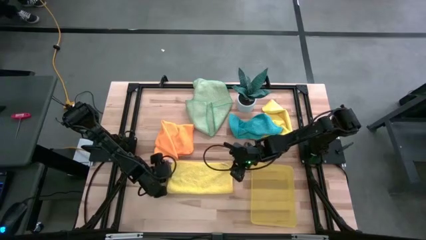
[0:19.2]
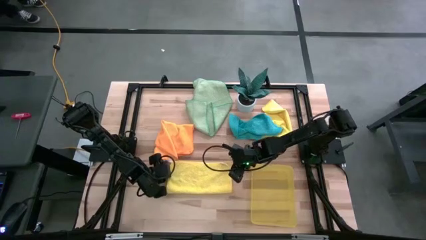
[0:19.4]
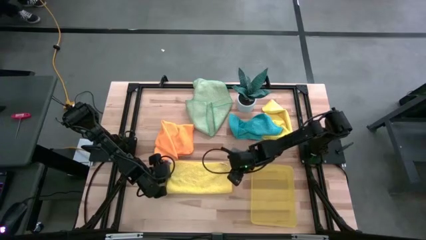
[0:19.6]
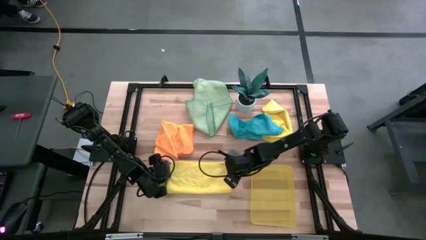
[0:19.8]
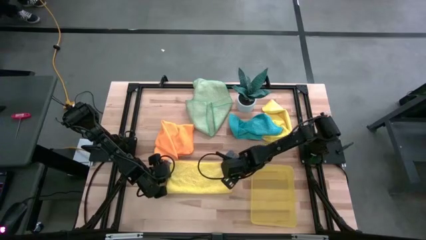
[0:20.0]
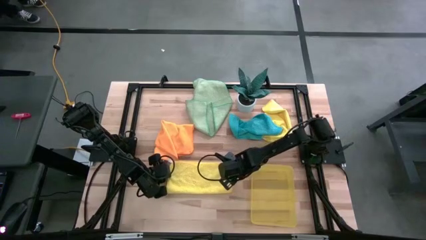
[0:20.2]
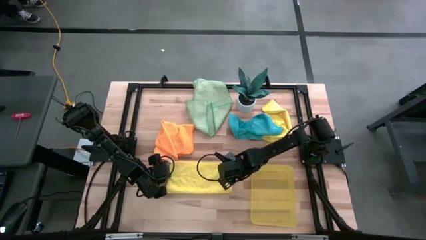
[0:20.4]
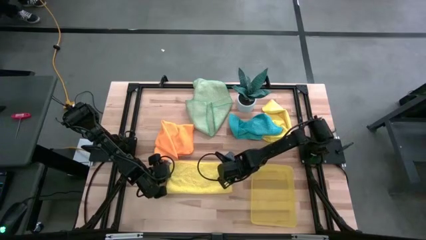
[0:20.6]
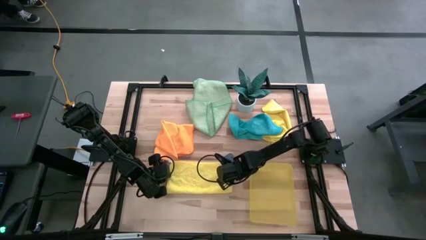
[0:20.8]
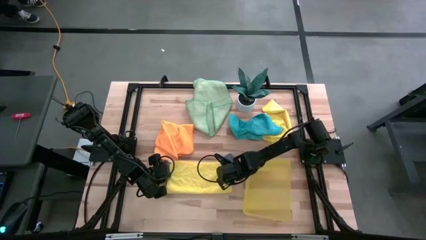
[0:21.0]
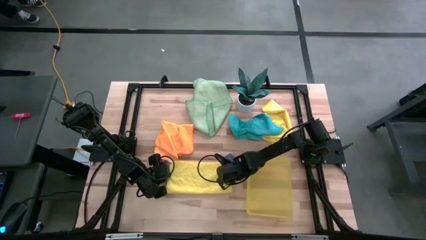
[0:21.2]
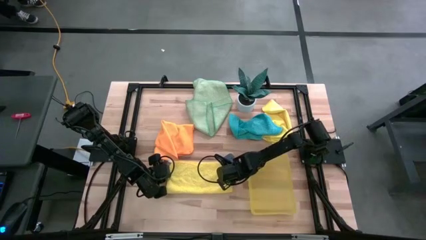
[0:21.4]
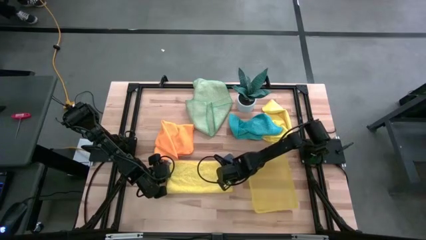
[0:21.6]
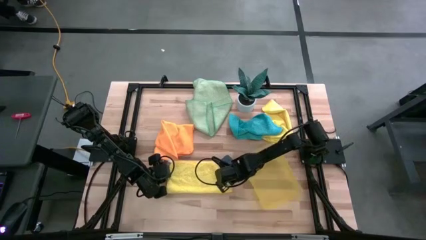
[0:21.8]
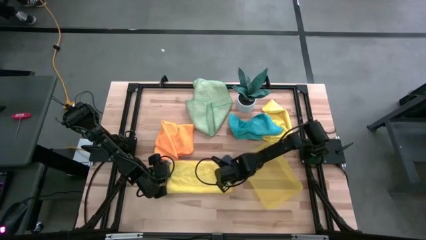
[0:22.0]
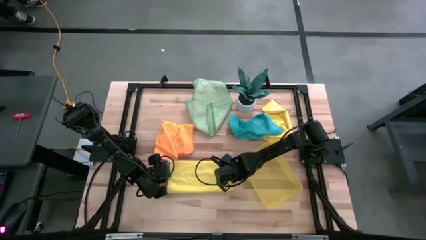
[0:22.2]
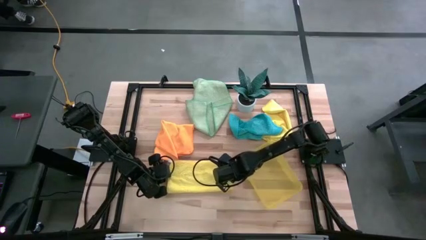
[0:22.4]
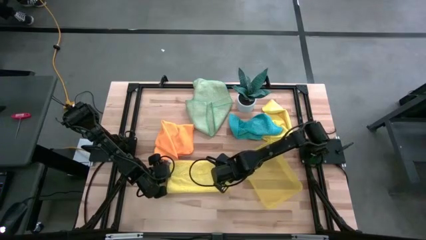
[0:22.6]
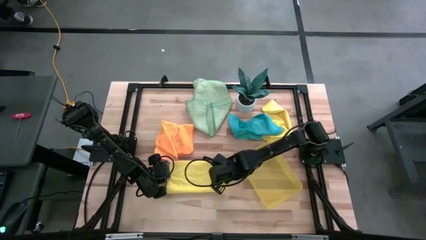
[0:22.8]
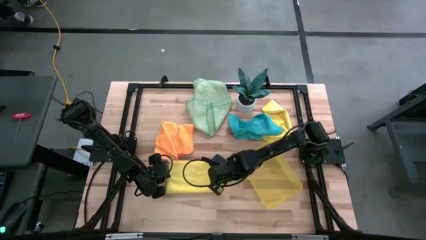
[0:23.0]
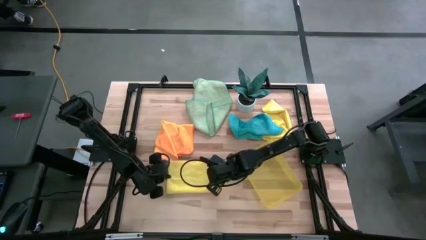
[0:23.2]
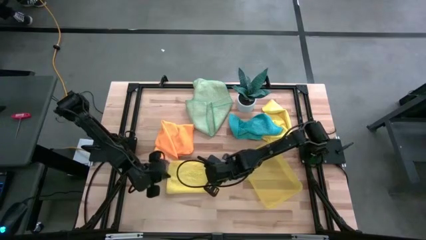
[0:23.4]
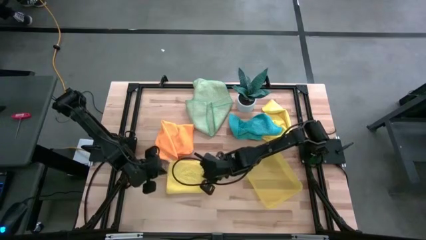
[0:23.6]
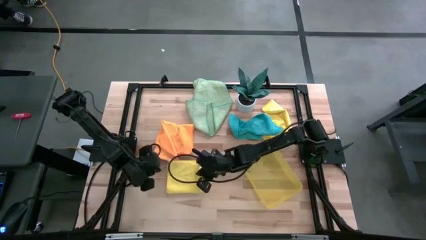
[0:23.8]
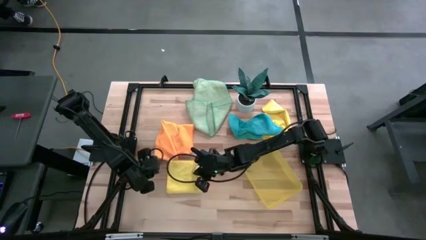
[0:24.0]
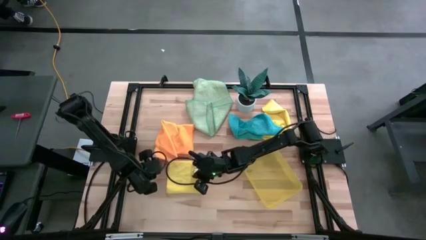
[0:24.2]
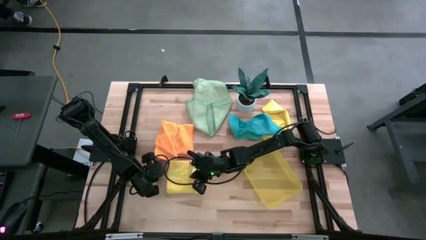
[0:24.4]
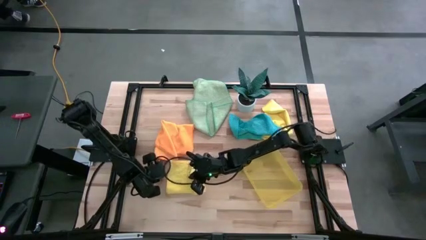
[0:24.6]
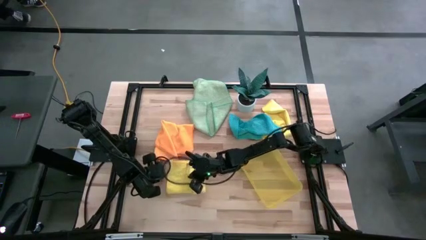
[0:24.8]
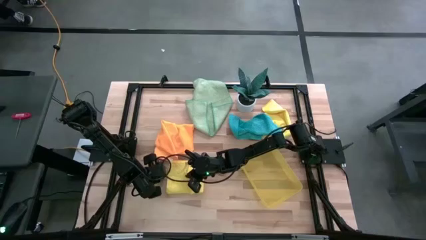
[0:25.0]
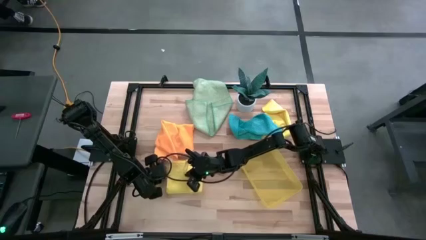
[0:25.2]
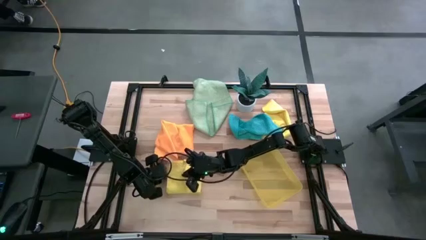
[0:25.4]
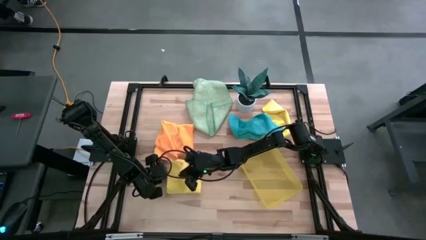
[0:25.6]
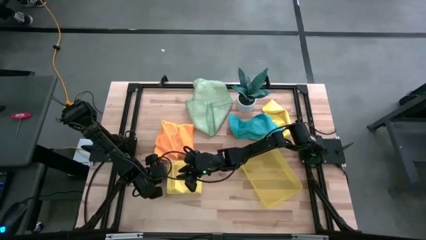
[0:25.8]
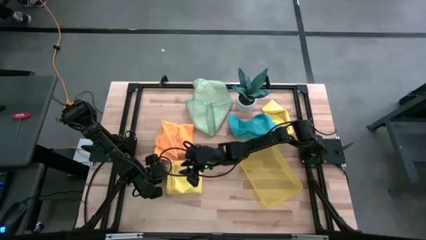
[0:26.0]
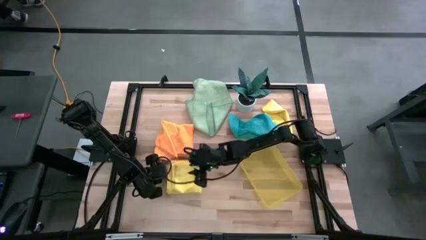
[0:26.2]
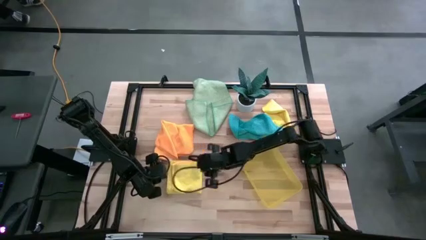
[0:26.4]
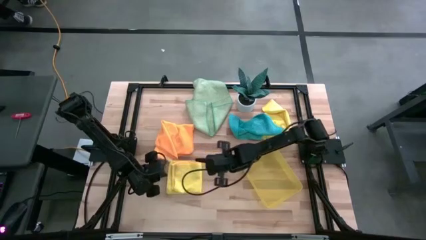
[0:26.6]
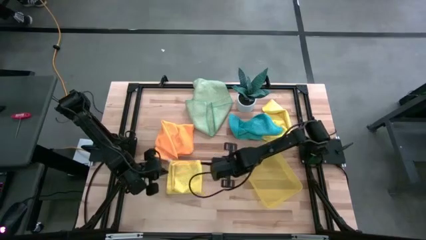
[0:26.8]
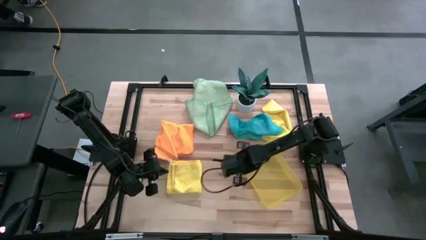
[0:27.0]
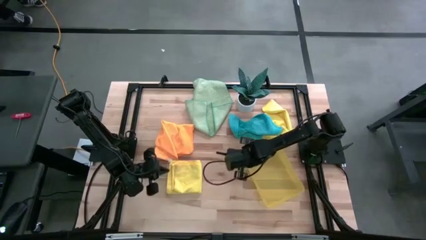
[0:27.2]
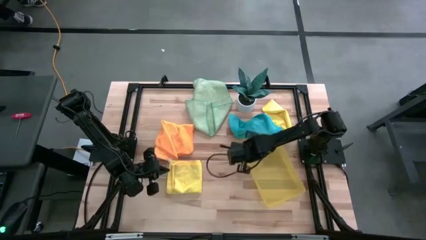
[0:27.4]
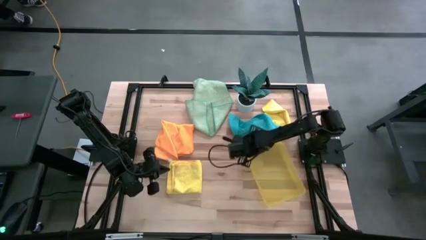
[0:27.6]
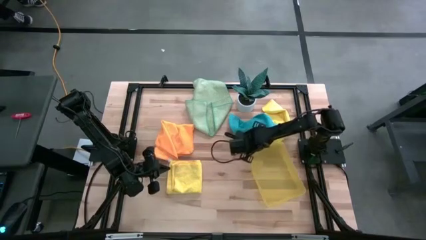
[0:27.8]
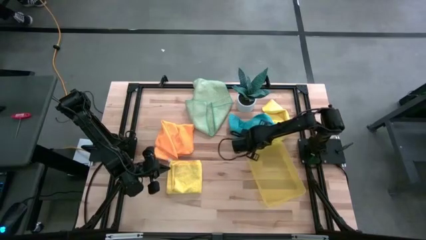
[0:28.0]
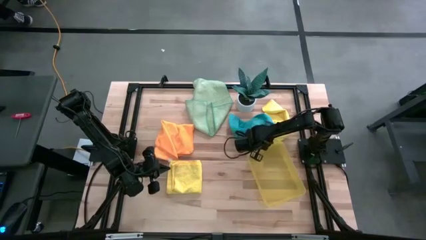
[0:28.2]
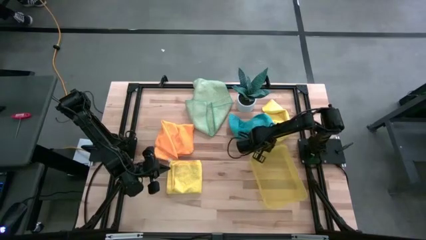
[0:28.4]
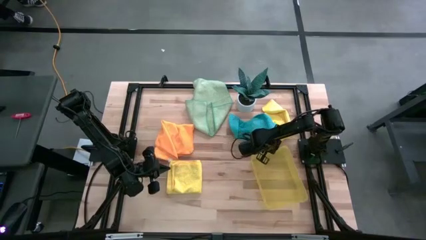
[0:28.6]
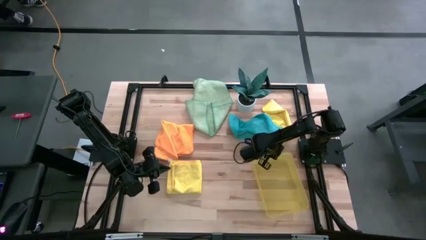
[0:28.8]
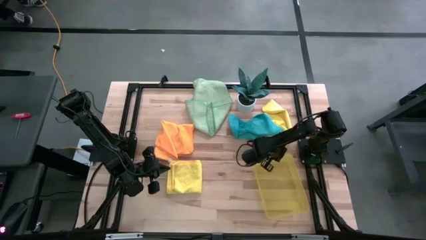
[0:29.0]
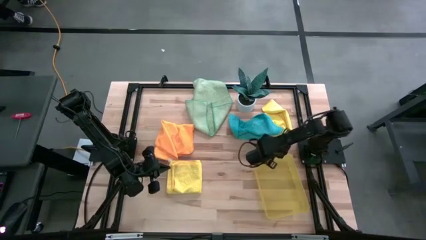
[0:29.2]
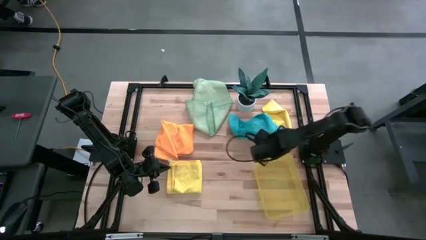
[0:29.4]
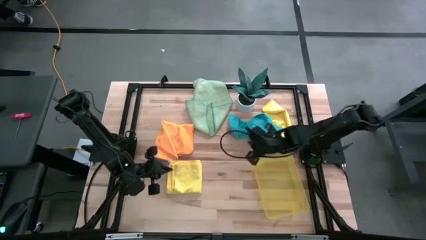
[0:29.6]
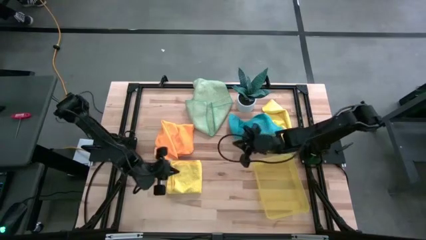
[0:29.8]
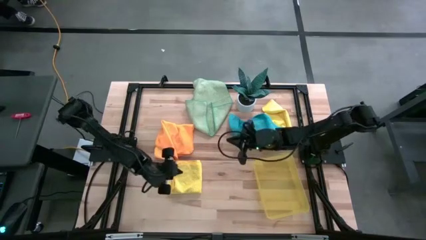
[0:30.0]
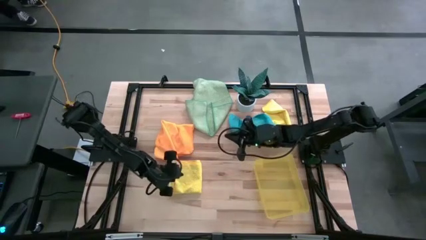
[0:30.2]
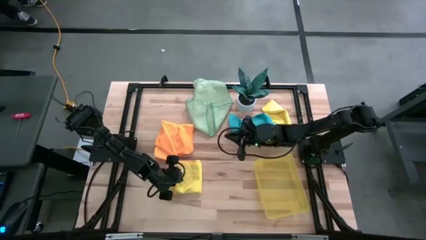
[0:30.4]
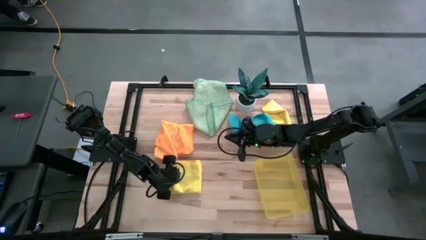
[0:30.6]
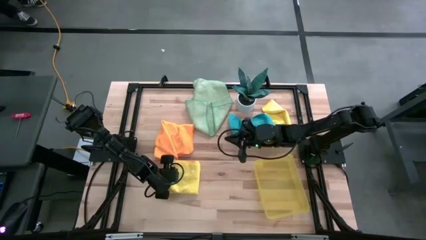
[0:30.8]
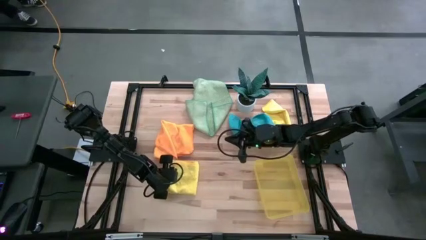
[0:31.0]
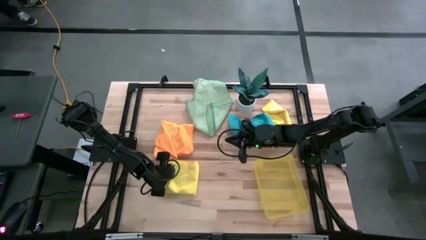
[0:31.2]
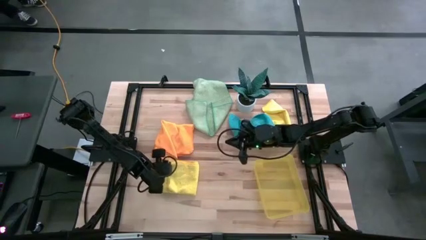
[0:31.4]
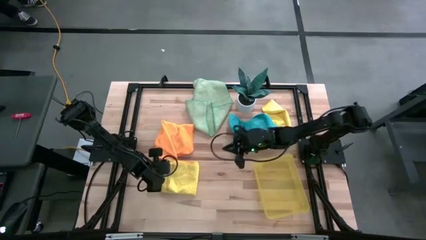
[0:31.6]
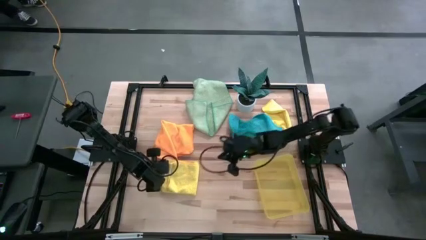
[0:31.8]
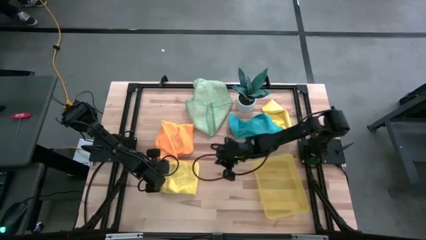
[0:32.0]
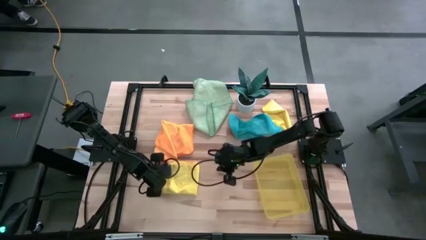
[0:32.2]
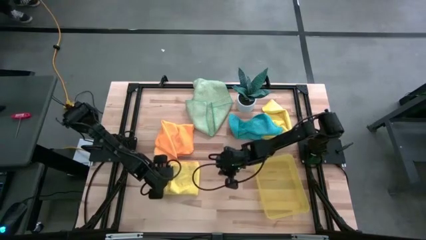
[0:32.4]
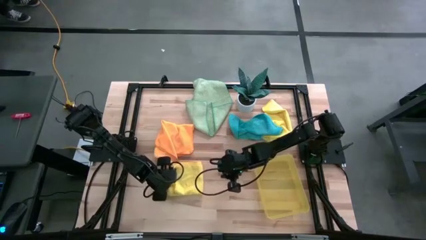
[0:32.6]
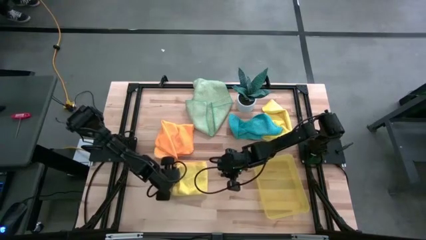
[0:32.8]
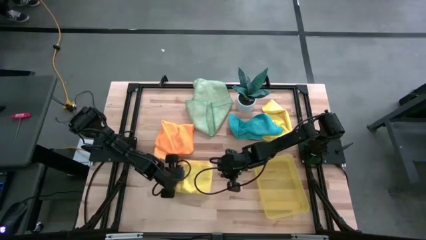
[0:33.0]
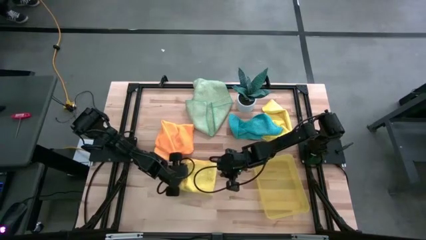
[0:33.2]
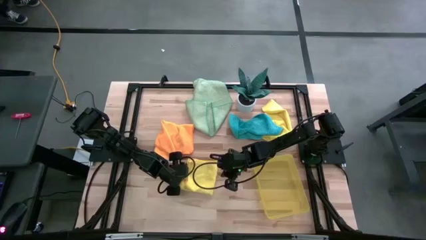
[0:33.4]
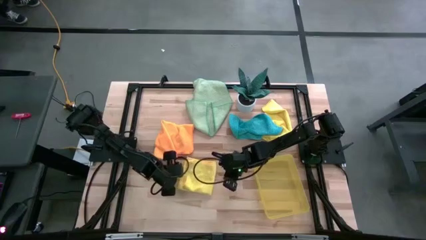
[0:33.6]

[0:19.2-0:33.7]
Task: Fold microfiber towels
Fold the left yellow microfiber cloth
